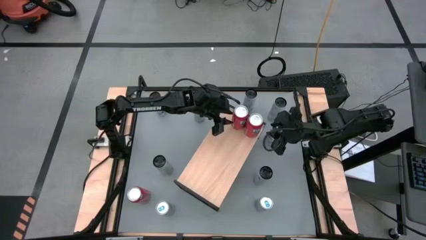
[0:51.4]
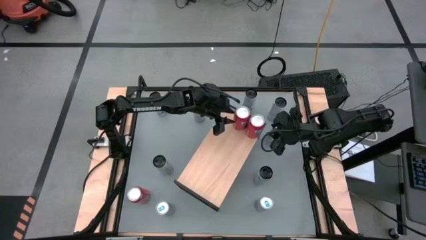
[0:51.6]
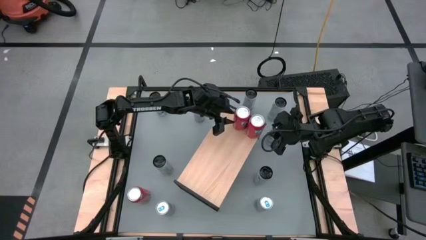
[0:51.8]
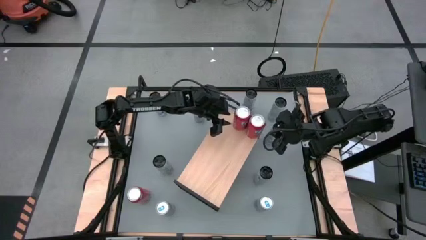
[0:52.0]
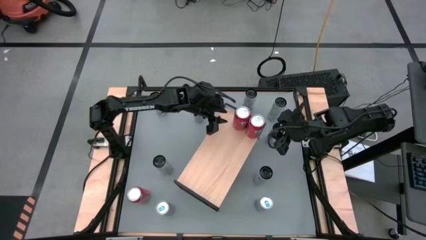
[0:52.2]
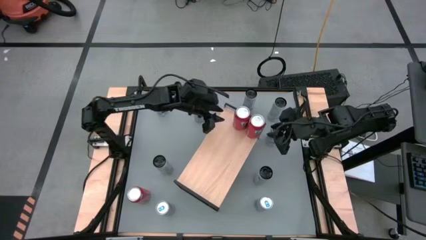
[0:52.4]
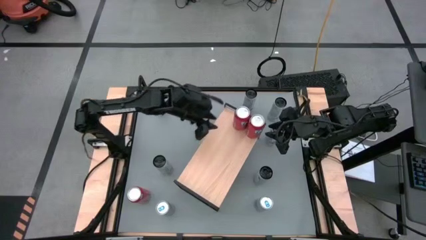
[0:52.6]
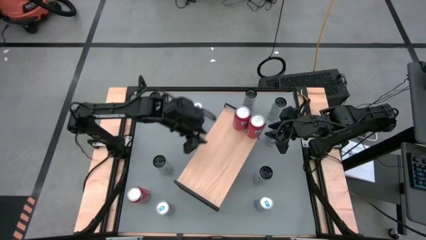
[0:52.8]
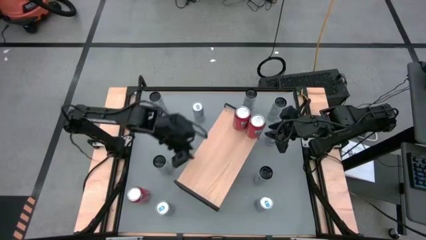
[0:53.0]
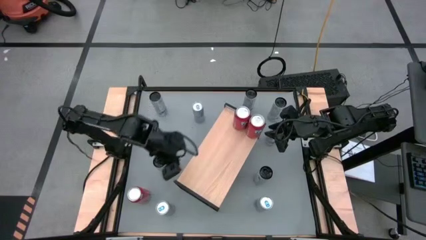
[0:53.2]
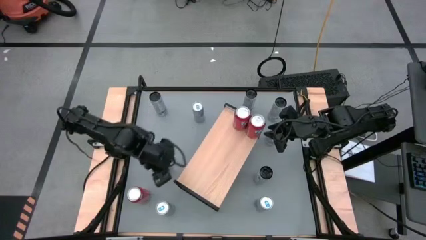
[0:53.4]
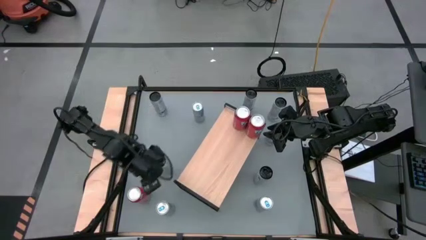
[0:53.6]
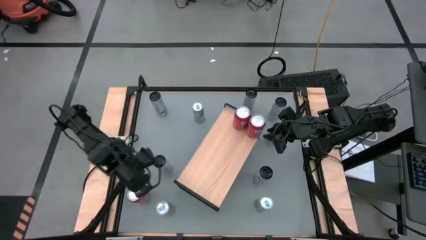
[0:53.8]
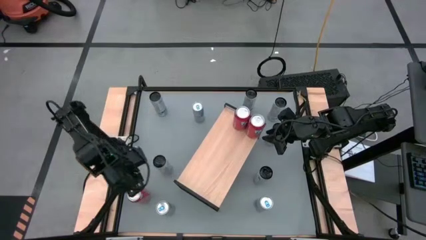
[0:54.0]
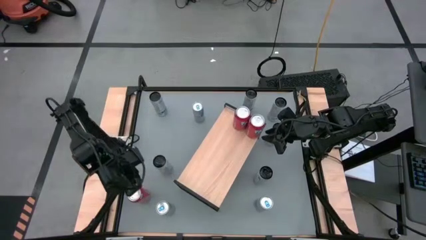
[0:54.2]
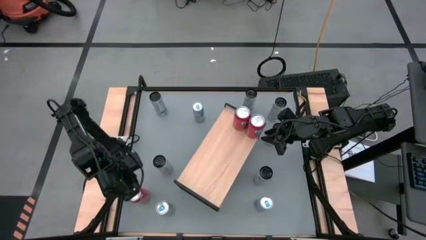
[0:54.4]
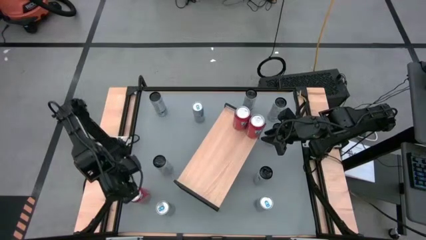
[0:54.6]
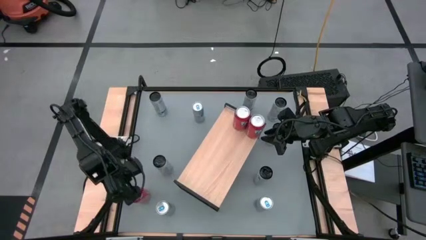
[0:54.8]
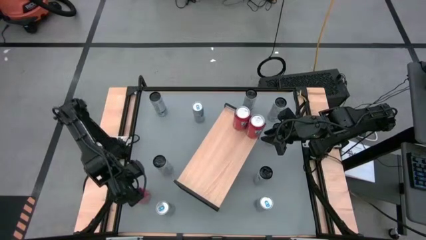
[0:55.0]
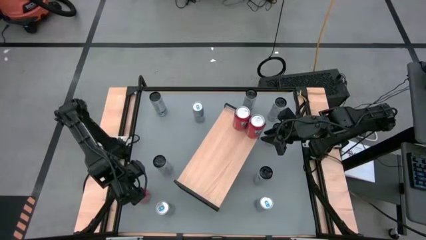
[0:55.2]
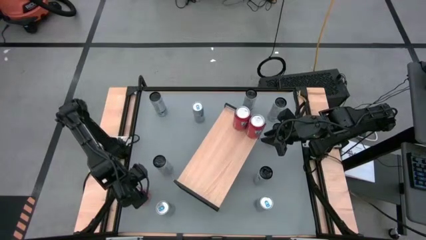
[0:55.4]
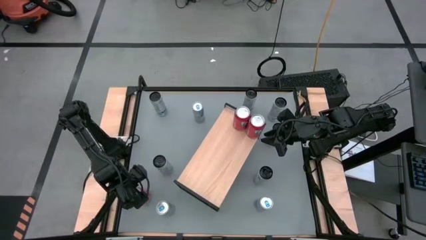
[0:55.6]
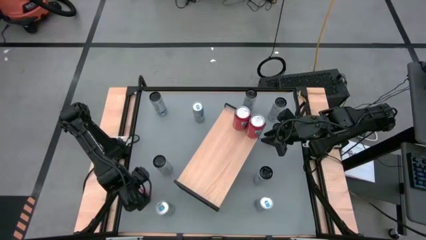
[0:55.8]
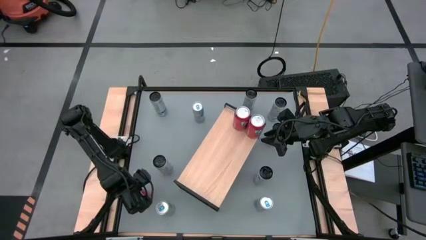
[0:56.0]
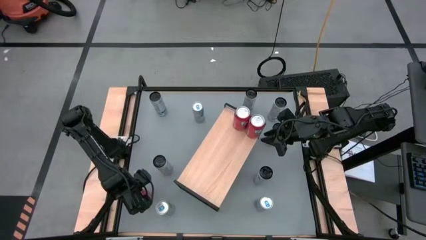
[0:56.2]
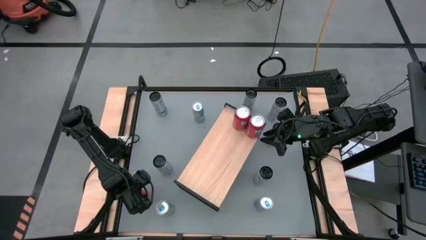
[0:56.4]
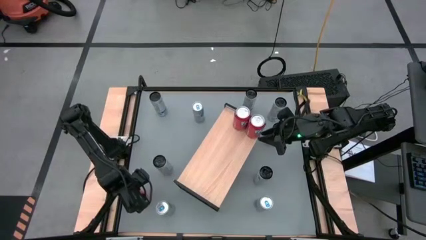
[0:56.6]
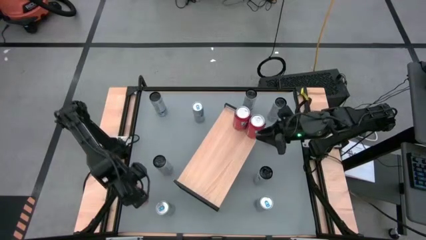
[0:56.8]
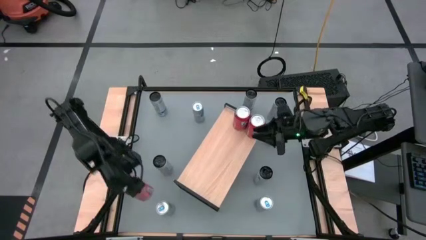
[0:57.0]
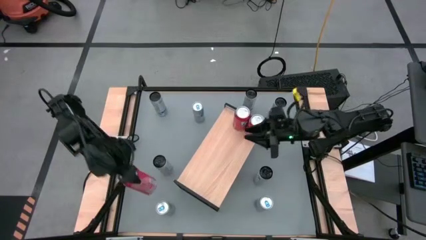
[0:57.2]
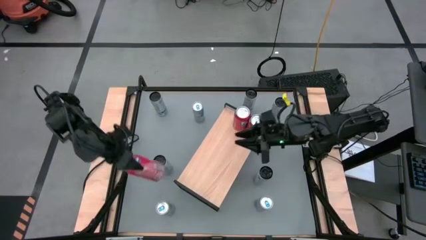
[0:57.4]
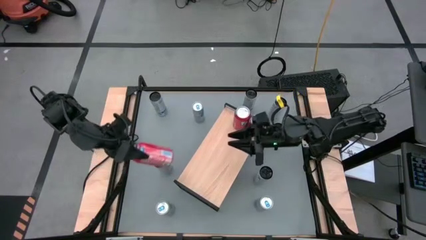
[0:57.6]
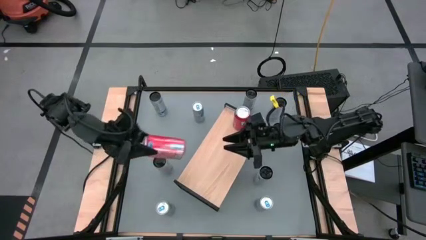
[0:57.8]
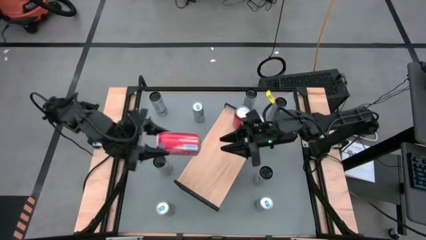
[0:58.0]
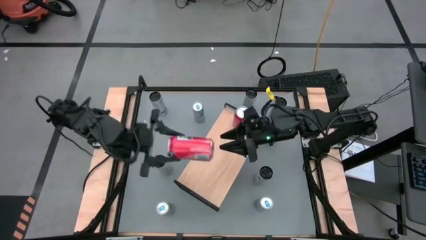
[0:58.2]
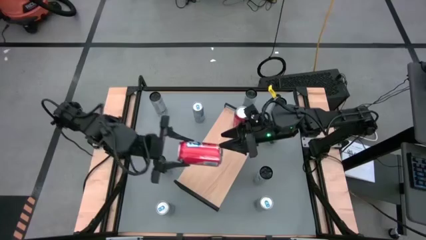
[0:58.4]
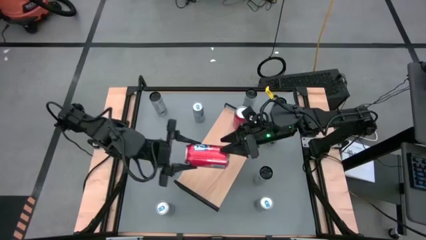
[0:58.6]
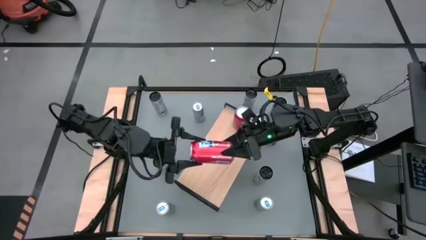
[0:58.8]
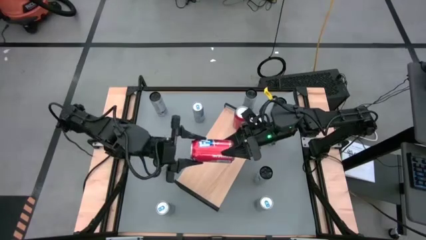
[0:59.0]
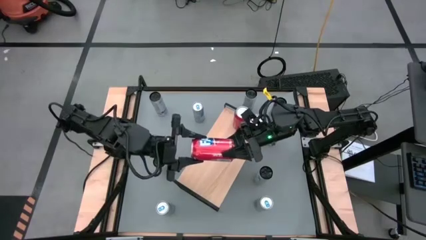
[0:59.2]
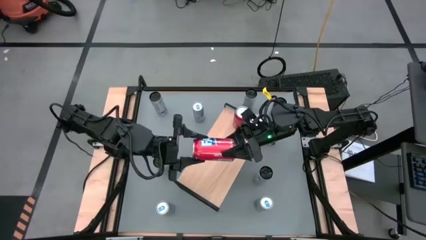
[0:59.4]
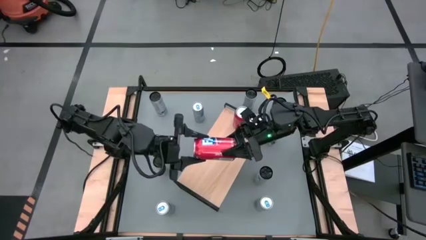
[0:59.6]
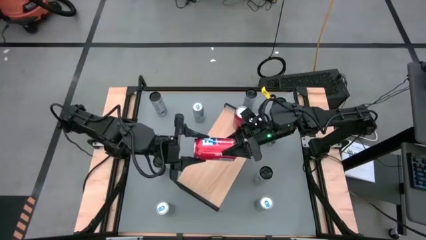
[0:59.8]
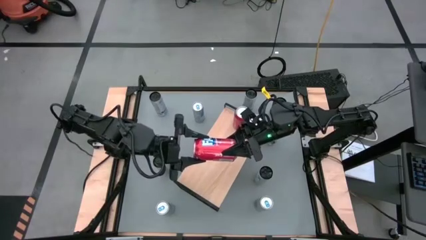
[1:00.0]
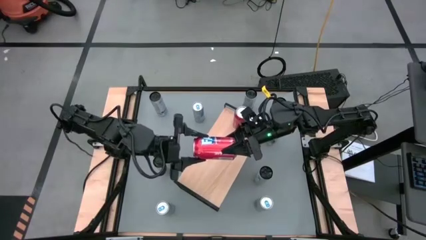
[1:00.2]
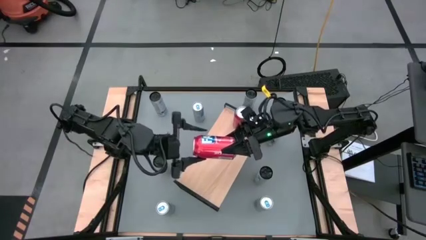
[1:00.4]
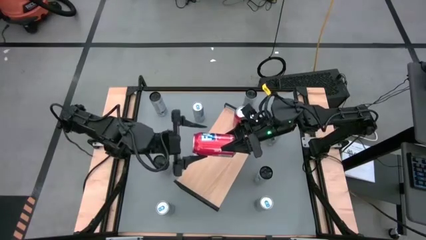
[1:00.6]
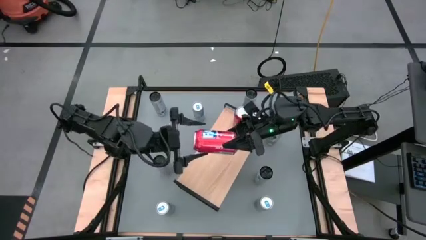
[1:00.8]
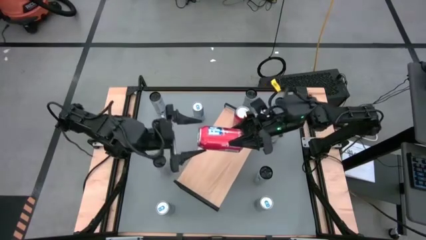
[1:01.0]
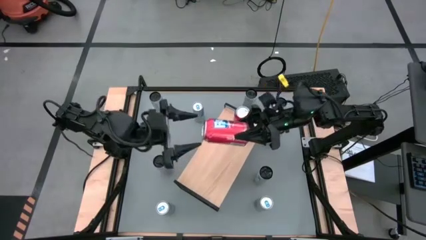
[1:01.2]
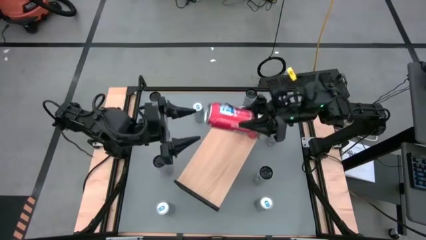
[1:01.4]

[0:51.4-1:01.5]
Task: Place canned beverage on shelf
Put the red soda can on the shelf aligned with the other red soda cans
